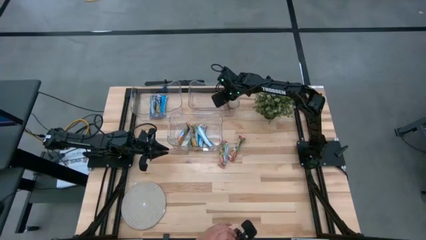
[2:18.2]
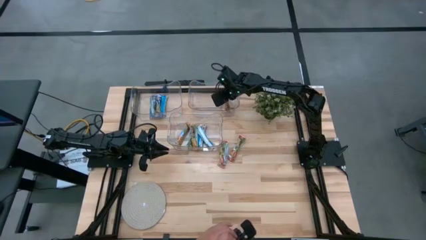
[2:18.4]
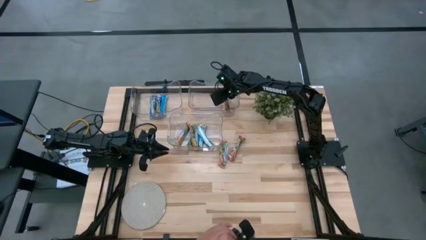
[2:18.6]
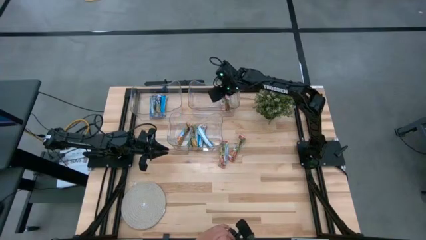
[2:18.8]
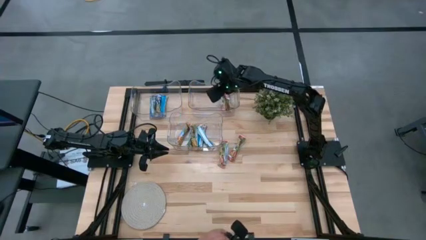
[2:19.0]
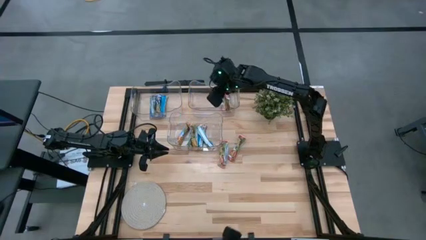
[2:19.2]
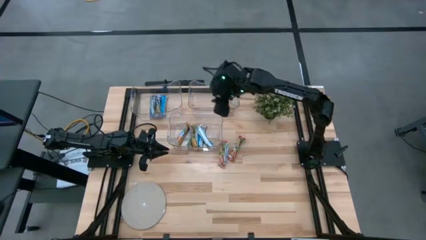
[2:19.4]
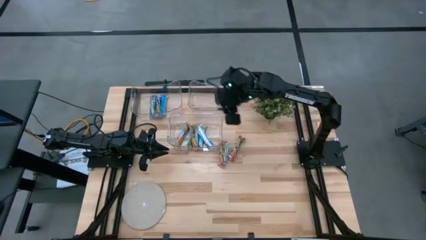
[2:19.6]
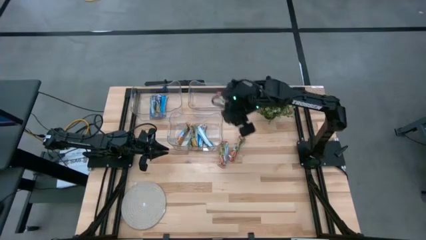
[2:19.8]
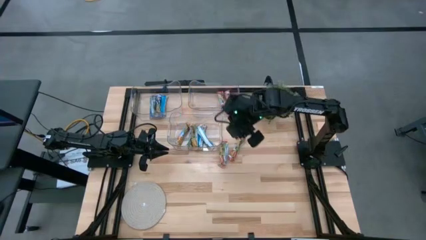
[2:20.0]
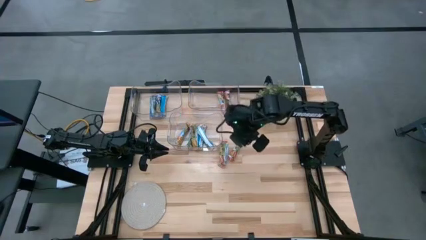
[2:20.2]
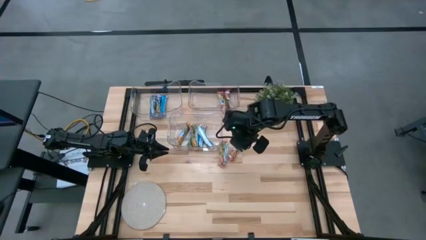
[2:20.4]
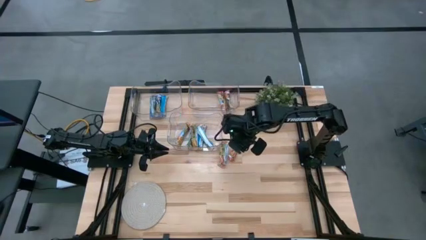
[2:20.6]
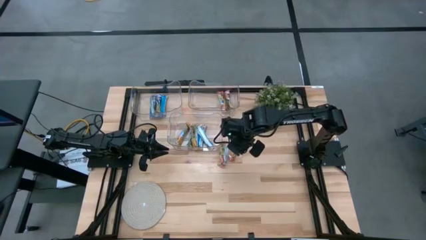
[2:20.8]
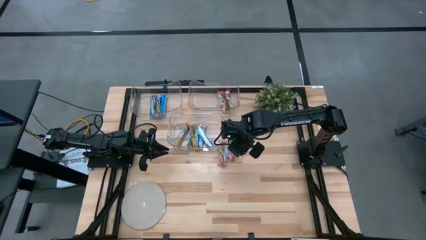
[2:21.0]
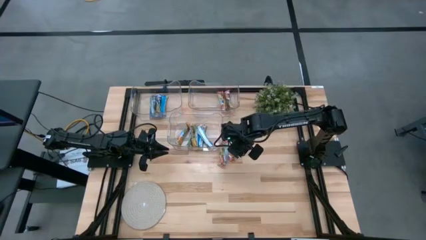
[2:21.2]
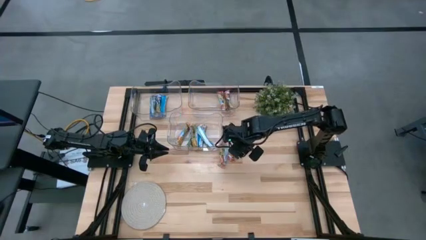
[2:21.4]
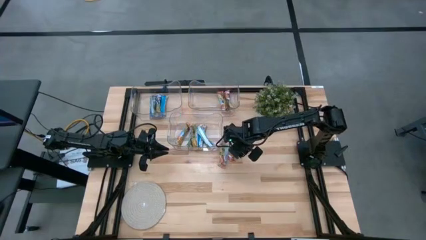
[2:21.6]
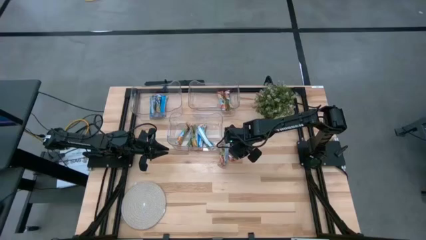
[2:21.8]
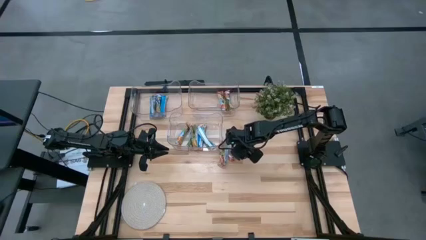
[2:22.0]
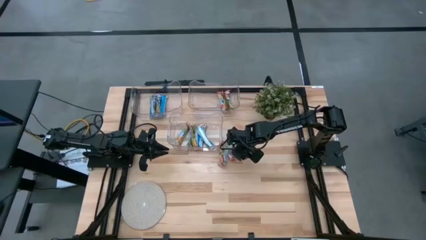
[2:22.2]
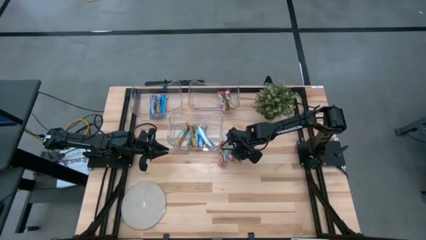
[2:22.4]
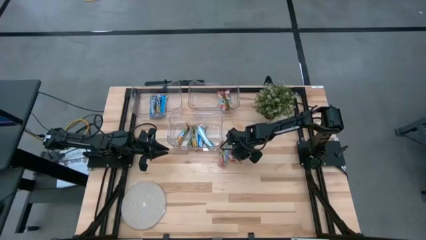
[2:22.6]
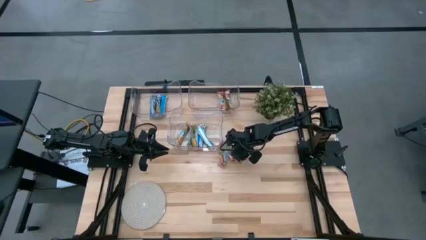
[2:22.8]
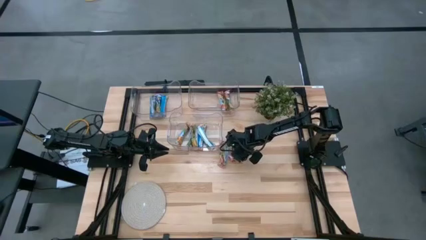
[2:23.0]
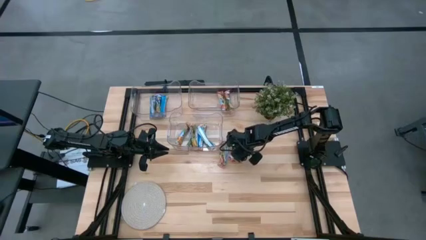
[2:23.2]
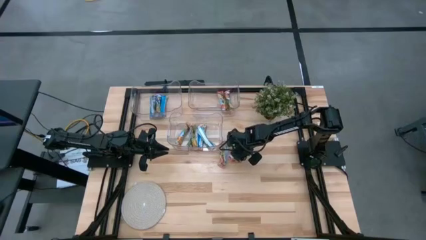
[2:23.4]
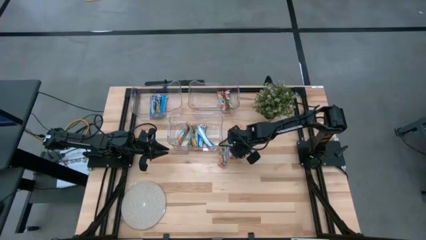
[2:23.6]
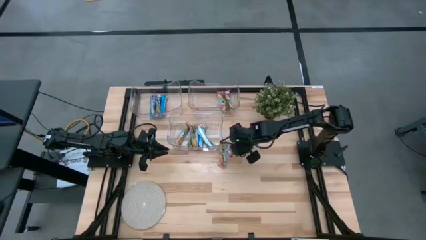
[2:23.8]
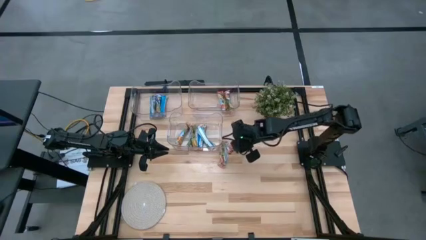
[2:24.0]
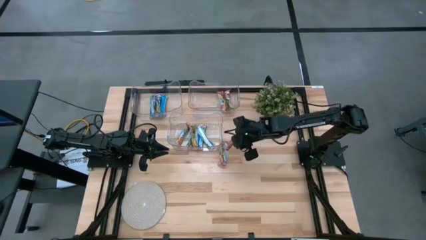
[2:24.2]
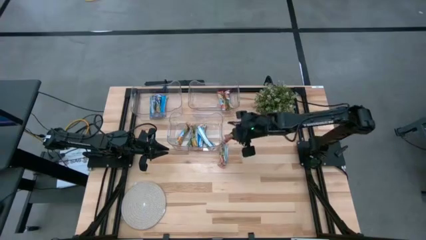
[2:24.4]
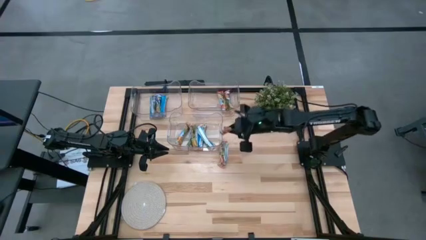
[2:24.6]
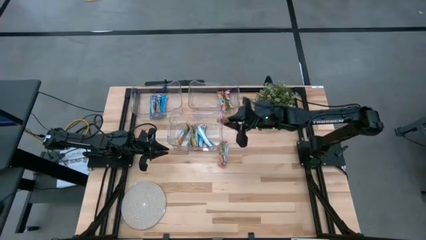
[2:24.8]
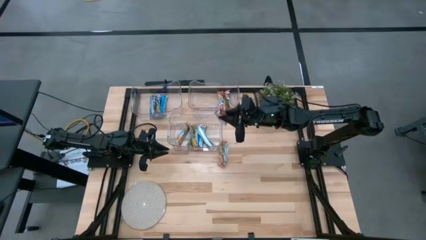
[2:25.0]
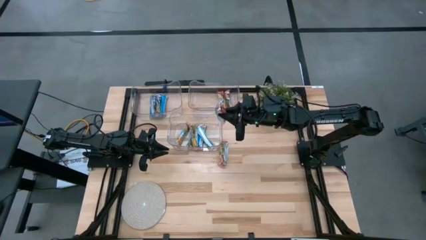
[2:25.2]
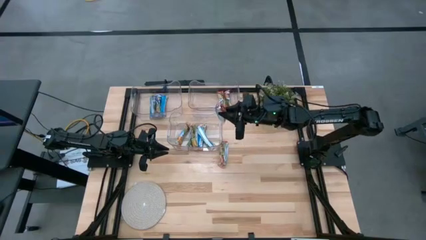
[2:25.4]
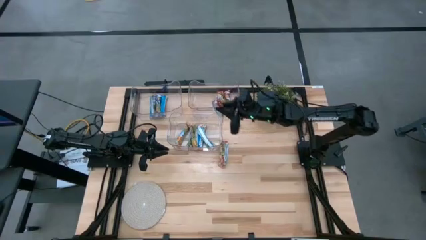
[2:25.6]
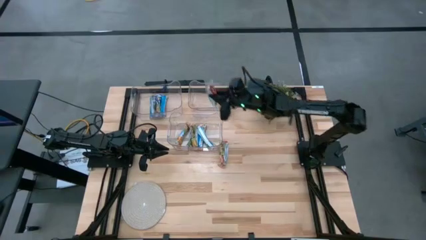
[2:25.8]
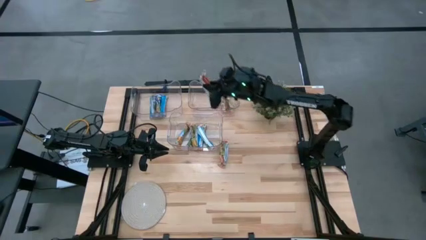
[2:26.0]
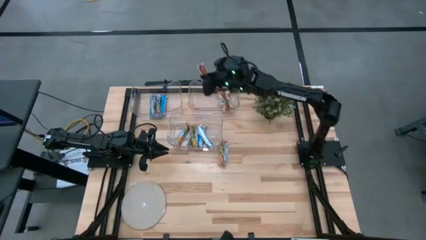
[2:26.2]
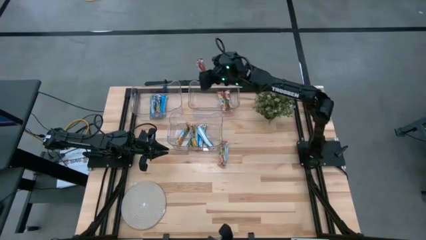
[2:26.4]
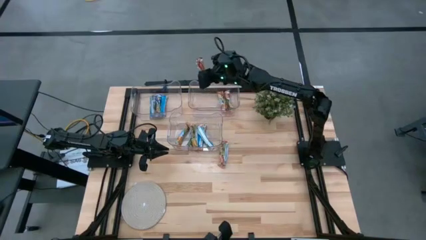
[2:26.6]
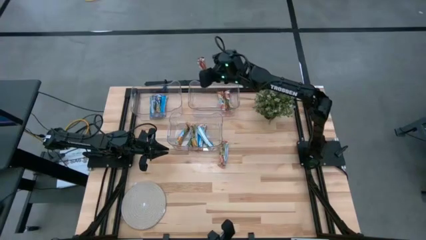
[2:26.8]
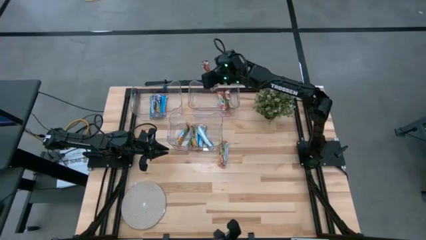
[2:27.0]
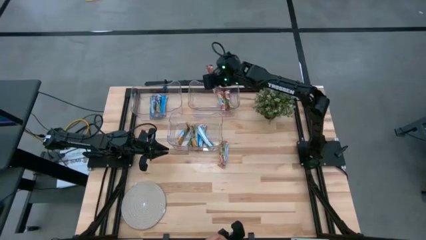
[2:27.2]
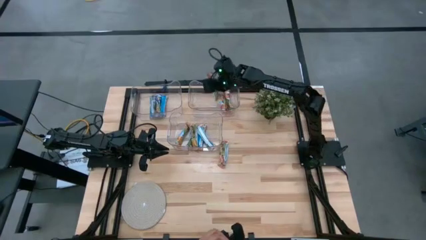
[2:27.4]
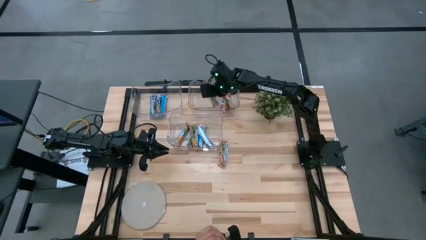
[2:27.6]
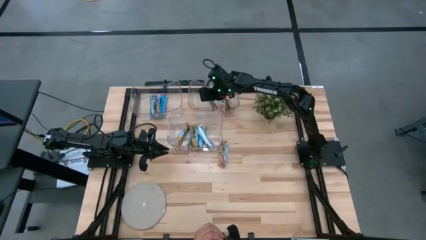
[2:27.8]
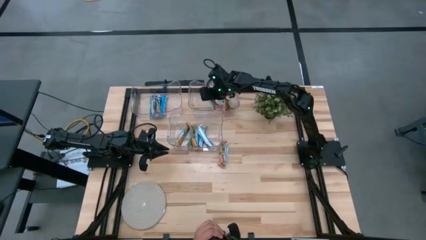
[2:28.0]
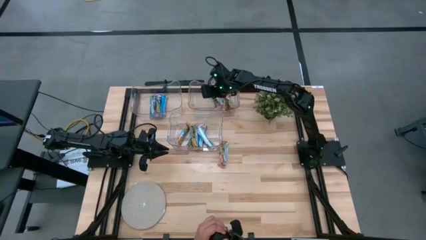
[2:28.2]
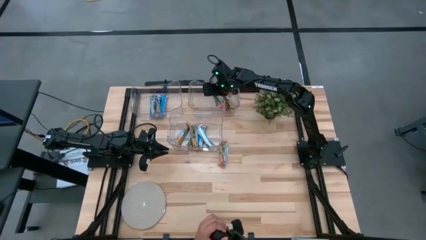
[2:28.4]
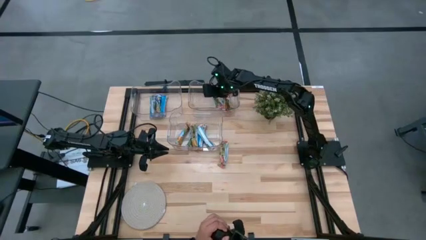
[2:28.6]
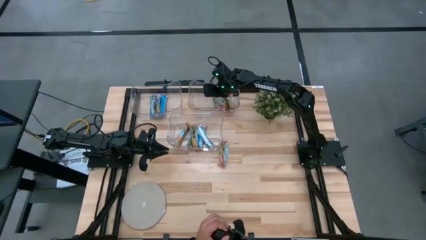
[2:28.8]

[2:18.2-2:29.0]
Task: Pick and place Granola Bars by type
Put the red granola bar into the top right transparent bin
